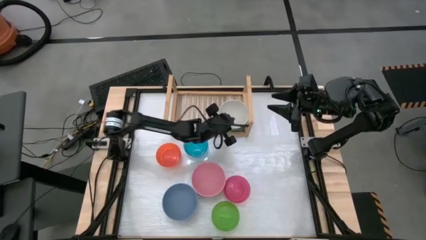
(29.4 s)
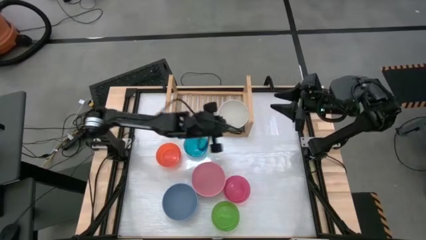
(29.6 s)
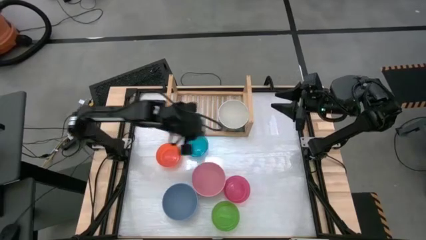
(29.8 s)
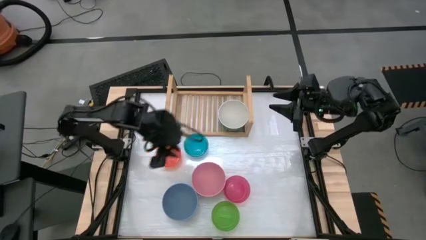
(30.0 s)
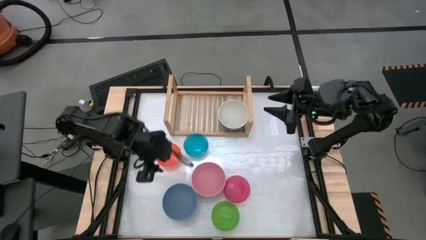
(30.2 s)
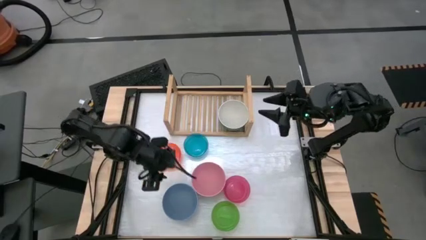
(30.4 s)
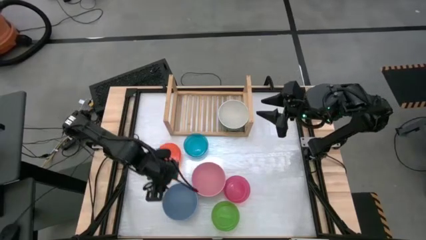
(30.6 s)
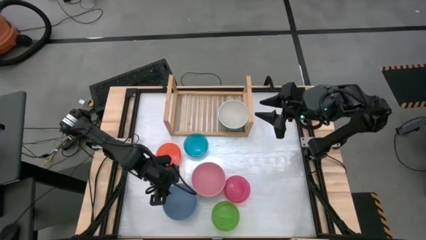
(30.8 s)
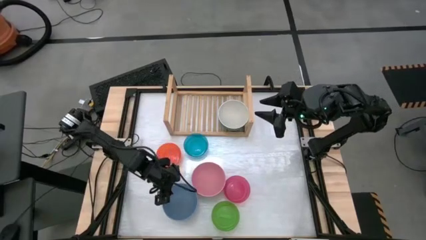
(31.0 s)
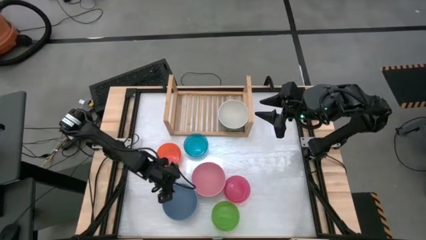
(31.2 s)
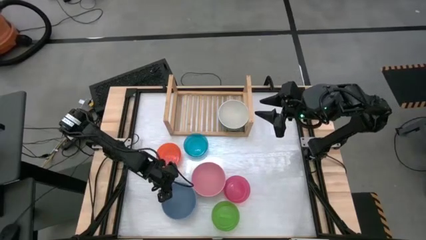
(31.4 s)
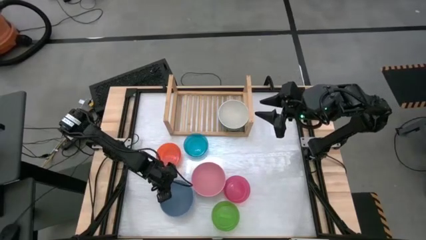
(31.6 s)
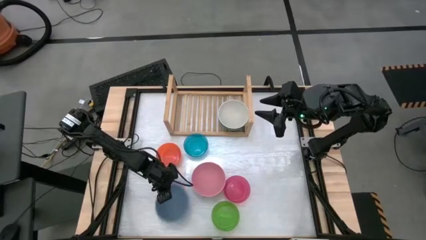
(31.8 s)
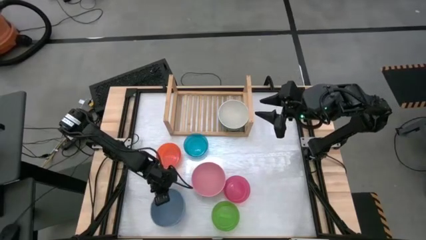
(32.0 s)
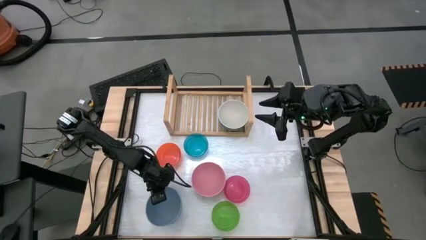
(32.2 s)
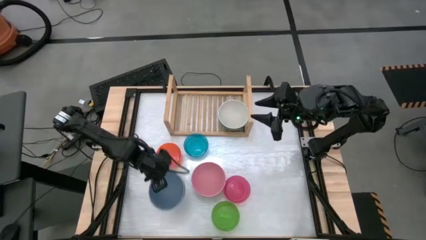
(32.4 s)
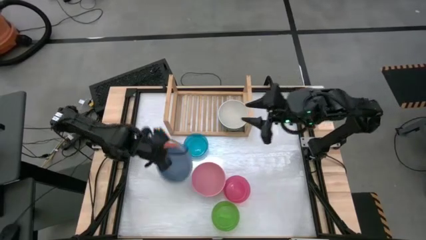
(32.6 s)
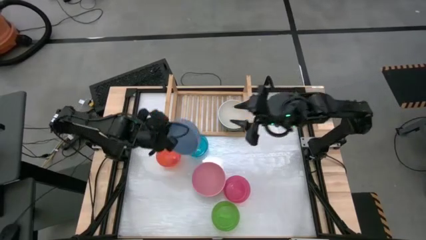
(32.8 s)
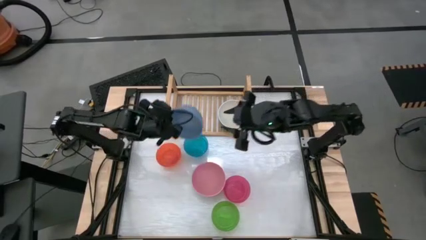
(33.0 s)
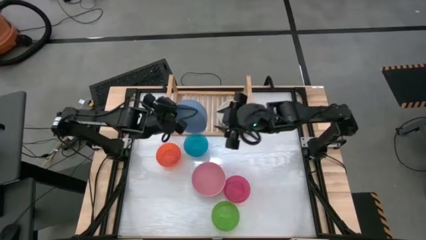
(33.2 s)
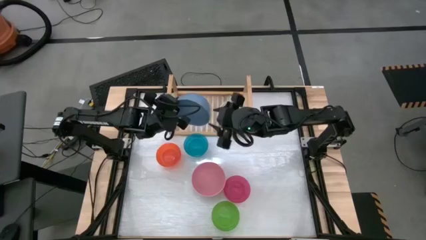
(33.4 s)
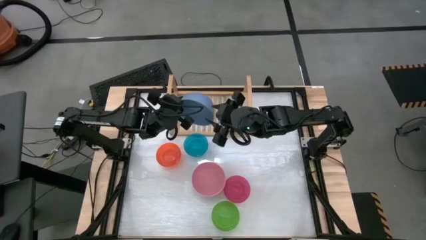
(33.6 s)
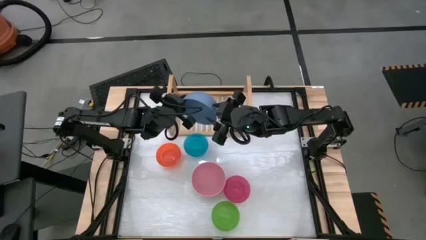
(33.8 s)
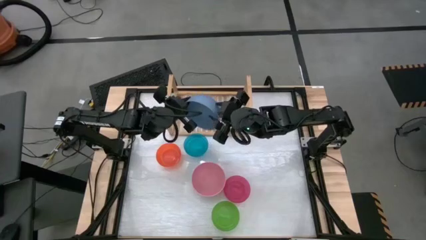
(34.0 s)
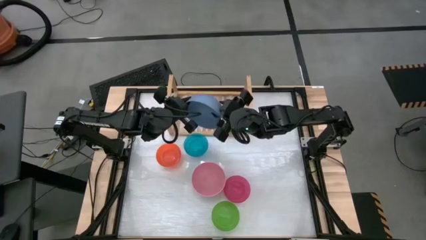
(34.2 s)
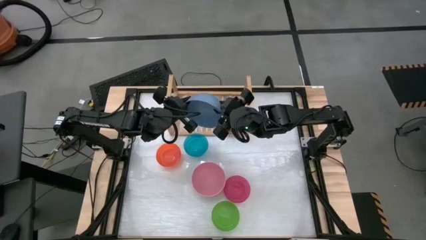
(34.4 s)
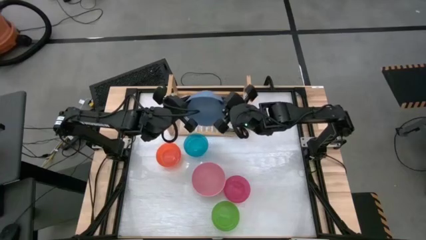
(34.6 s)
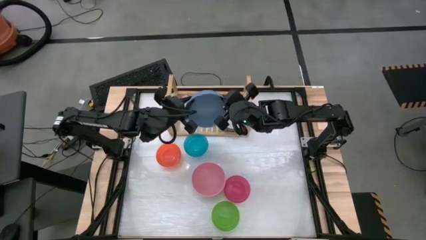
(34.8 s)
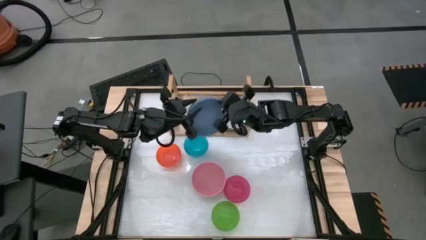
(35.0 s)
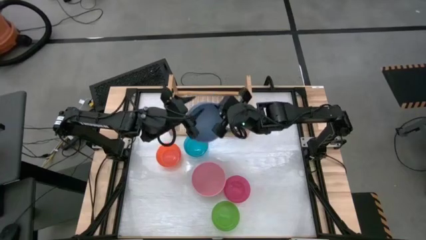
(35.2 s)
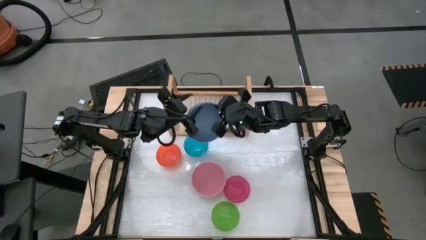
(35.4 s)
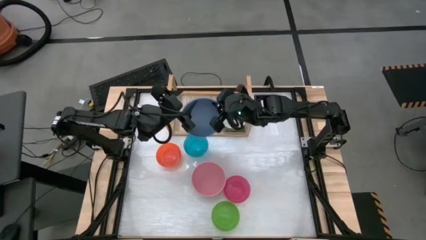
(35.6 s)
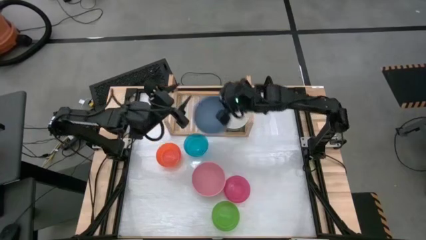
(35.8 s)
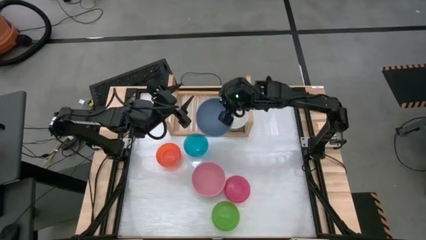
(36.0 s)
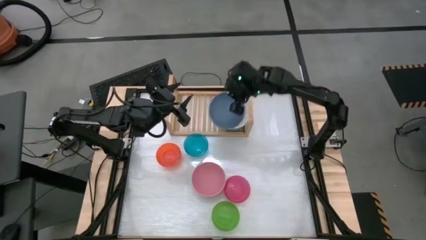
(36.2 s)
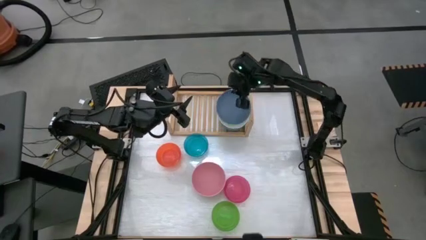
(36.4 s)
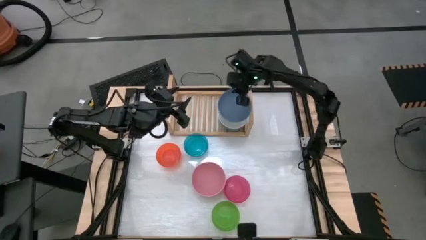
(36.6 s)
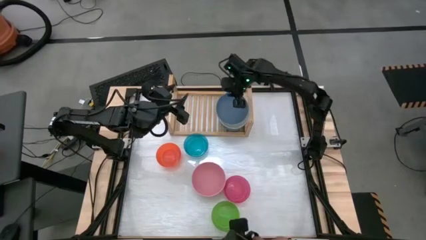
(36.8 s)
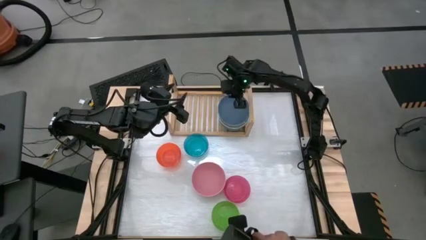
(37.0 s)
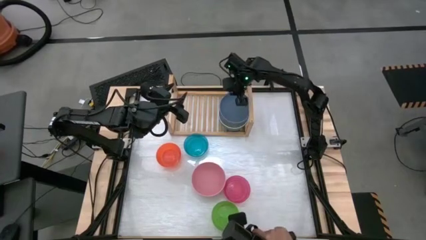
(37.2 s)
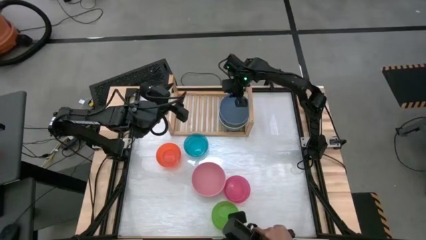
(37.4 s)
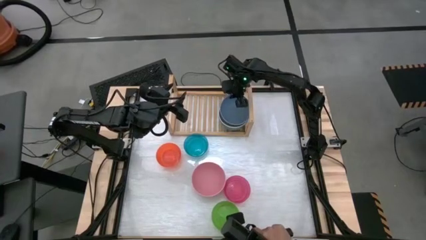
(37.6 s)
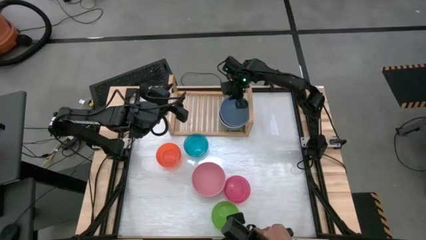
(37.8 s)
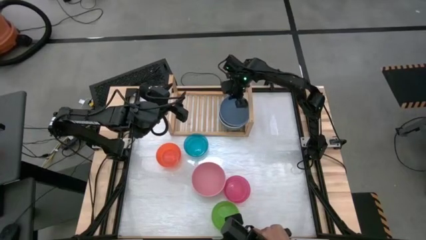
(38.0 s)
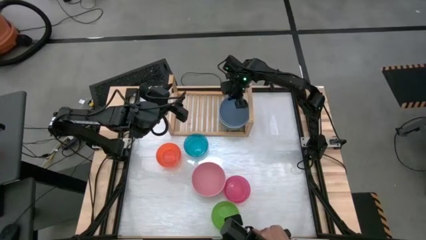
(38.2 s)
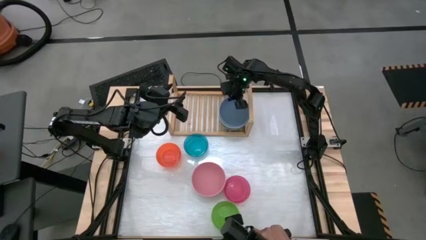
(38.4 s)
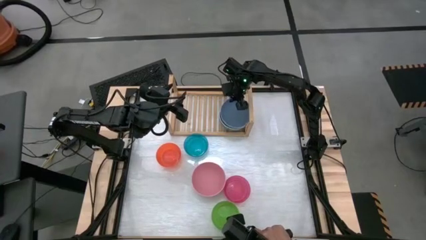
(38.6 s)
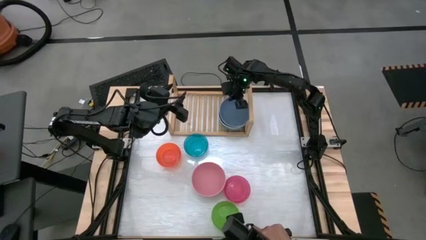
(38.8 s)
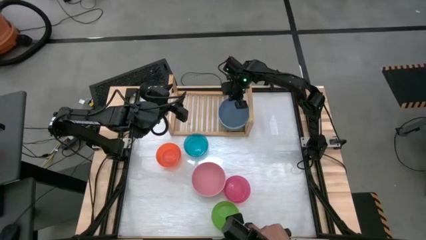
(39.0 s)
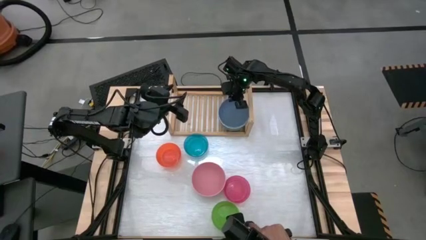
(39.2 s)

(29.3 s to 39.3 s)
Task: Place and stack bowls onto a shelf
Stack the blue bowl on top of the white bowl on the shelf

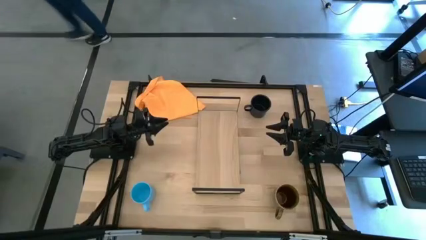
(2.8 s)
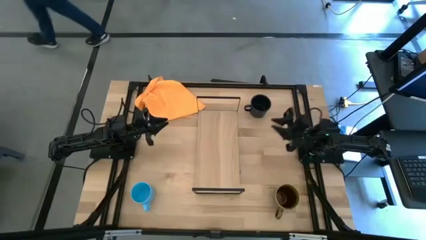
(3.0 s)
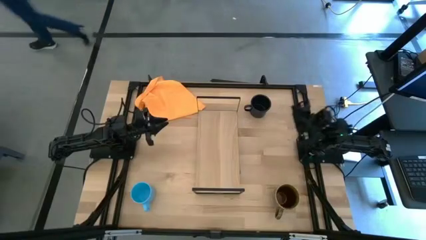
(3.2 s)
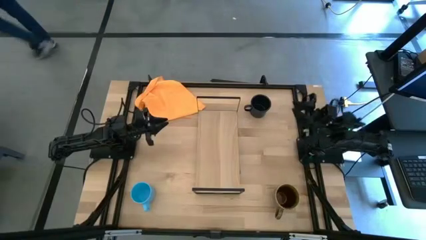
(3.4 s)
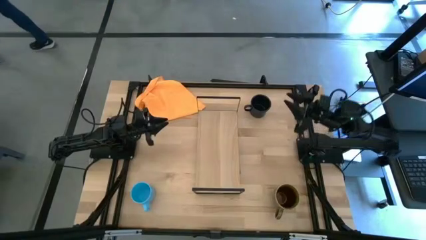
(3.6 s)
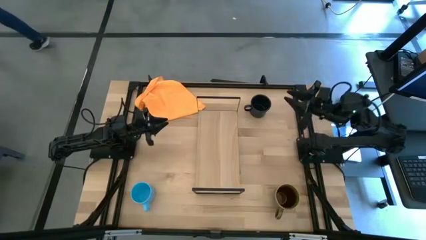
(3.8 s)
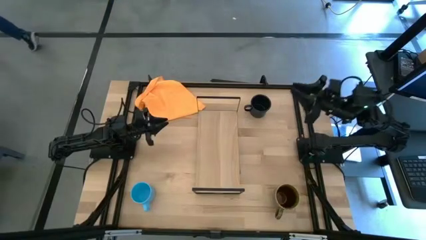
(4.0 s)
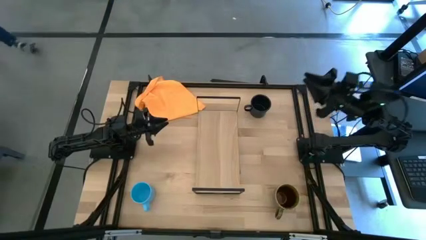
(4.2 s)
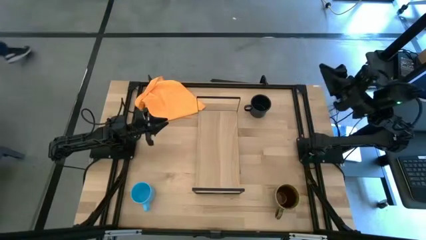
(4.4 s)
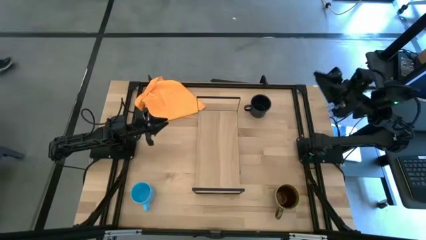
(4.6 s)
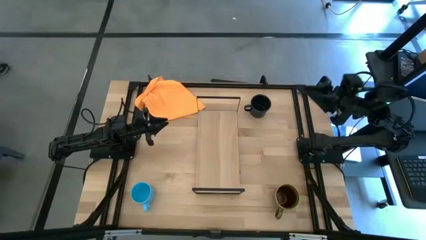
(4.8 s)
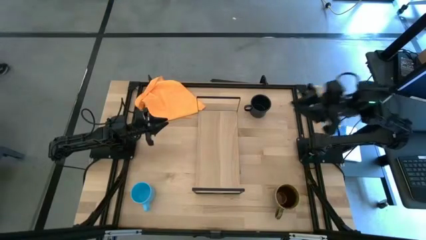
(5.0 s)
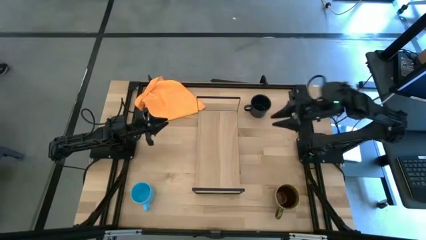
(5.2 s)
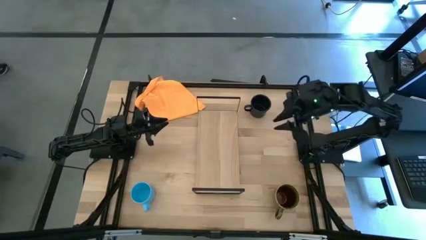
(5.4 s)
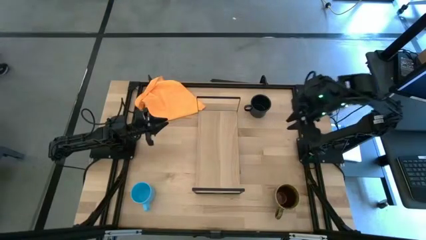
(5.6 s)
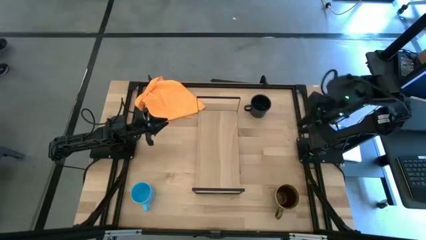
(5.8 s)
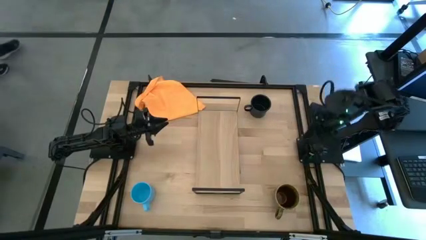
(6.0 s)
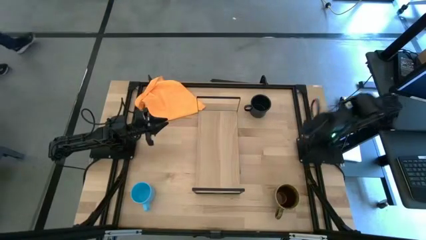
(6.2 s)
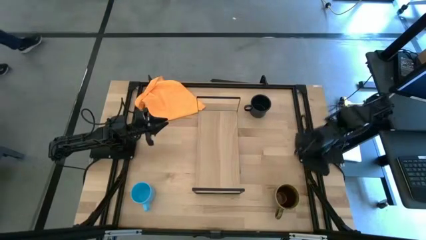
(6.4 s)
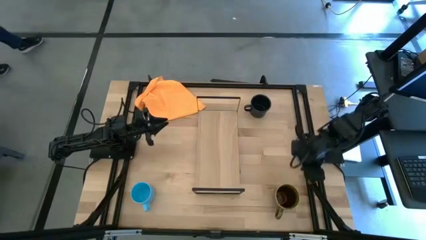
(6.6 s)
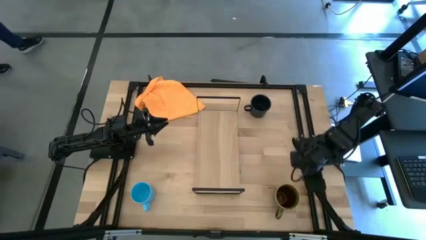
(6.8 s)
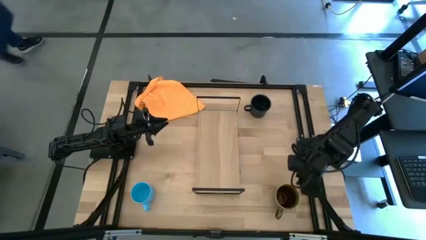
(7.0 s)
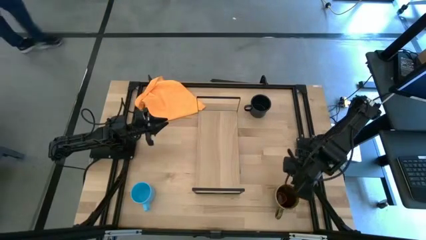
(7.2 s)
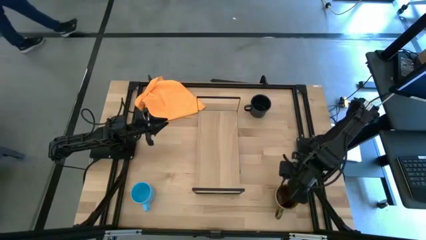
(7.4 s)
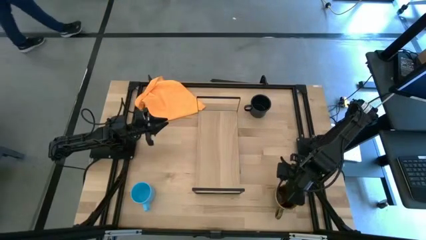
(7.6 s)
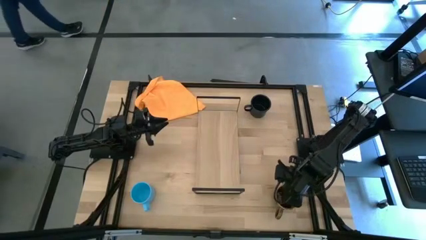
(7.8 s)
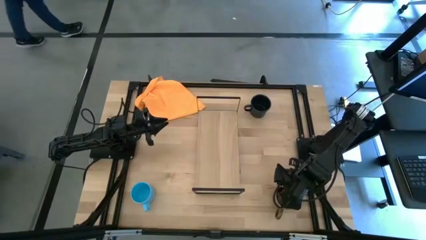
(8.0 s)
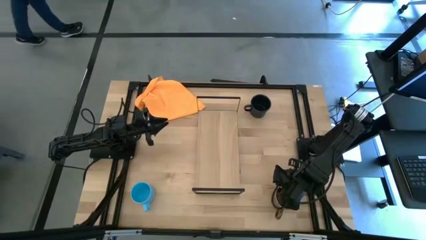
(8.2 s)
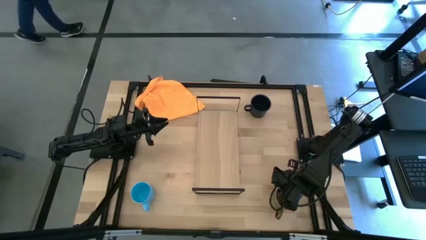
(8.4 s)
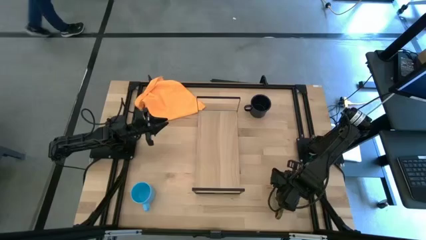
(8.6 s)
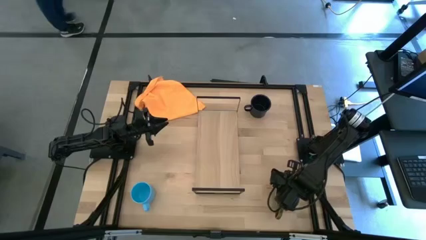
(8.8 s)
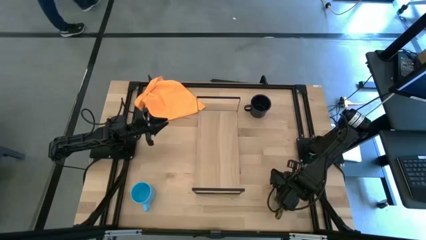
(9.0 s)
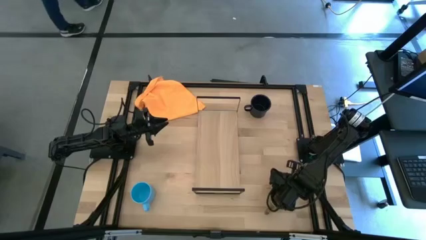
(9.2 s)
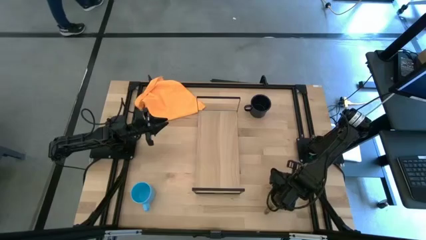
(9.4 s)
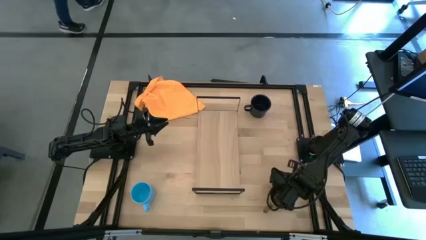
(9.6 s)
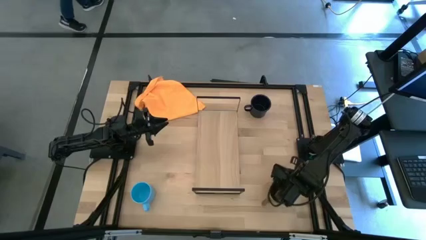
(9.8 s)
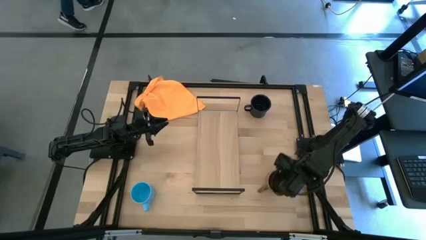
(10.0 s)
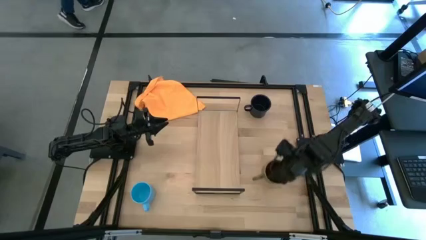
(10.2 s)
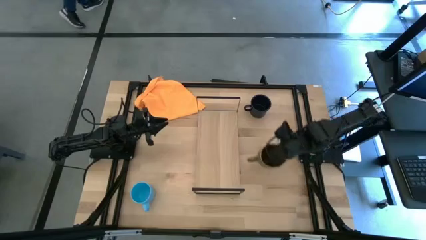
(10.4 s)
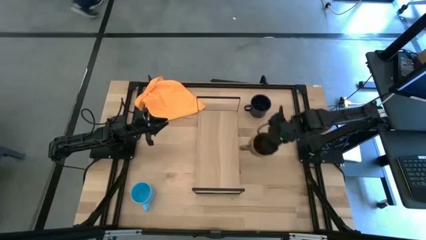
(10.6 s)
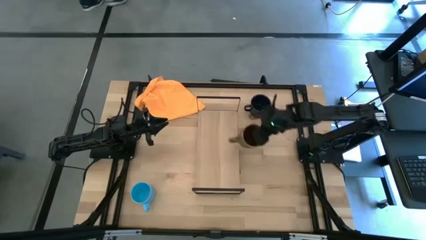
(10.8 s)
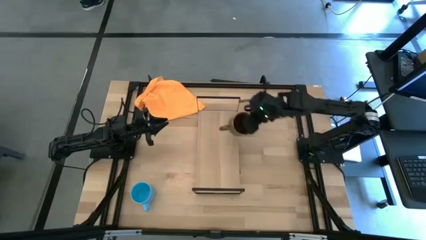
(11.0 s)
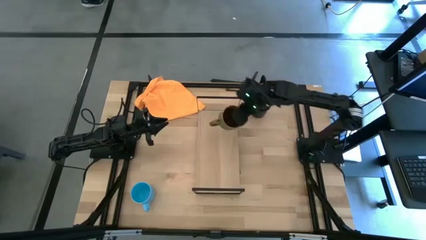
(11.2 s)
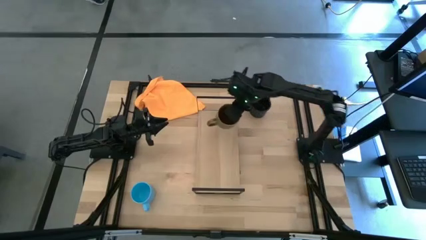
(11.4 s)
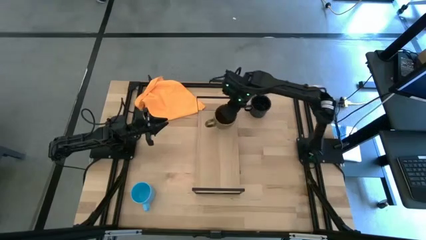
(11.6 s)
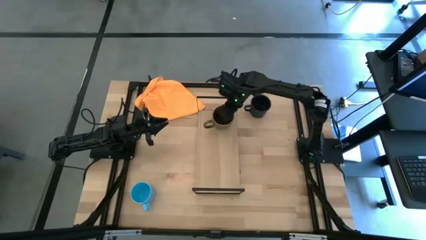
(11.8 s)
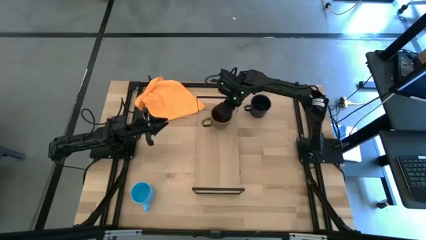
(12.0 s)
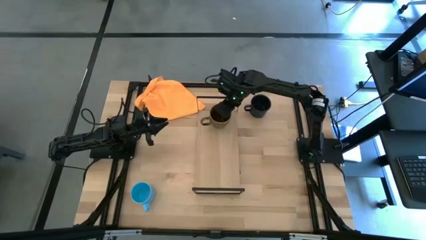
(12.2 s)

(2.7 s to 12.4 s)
Task: Stack small to large cups/mugs on shelf
Put the patterned yellow mug on the shelf
